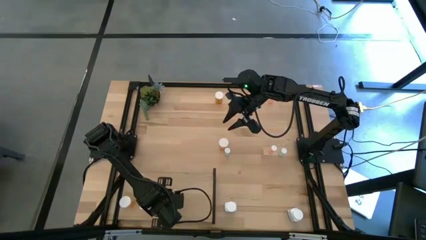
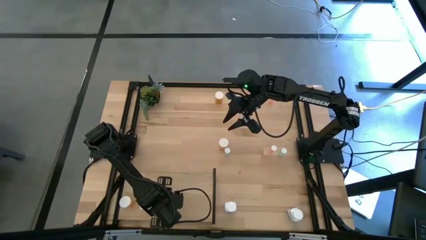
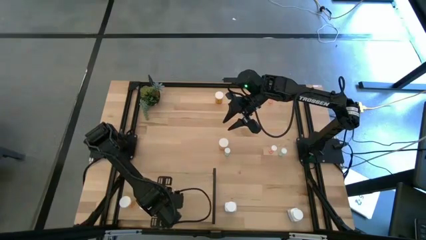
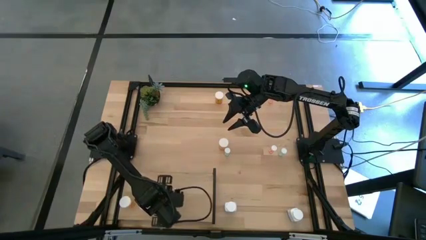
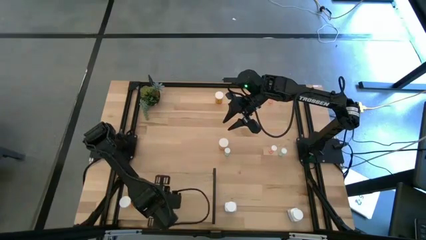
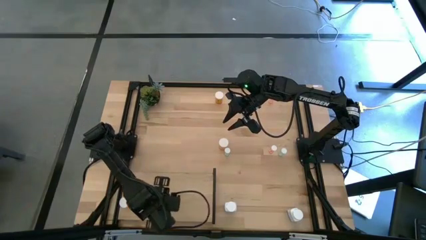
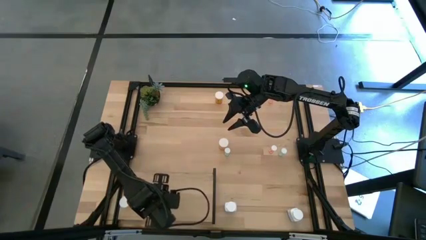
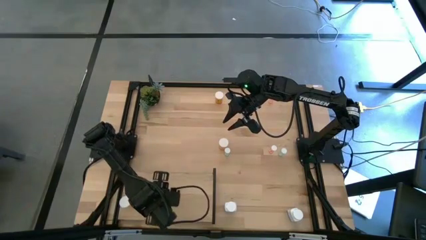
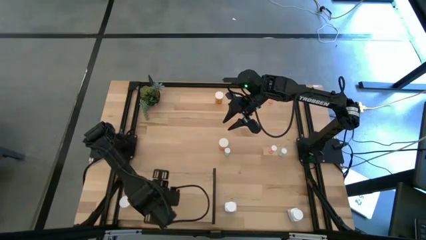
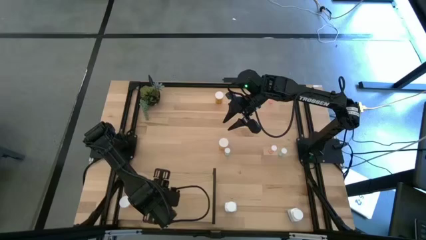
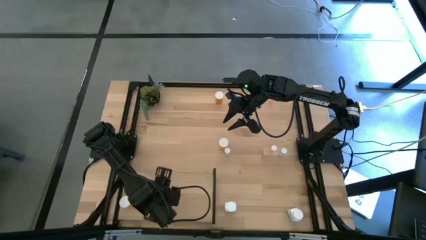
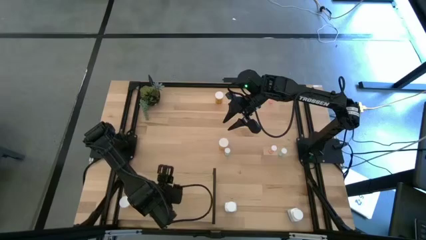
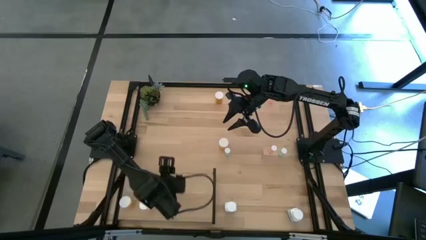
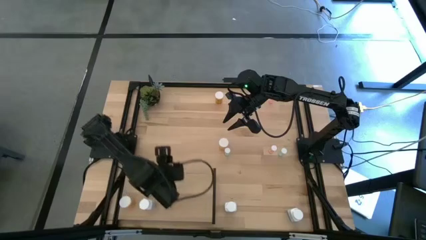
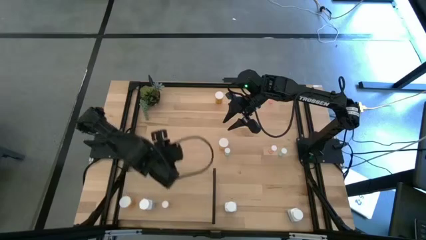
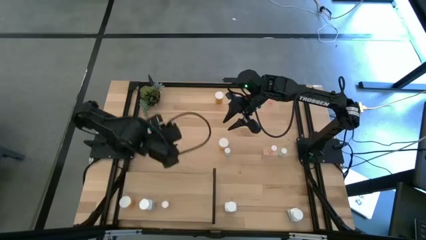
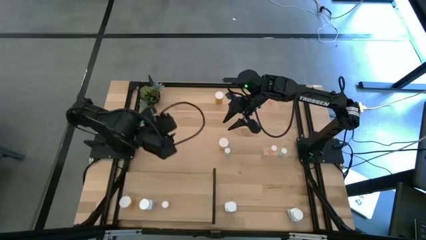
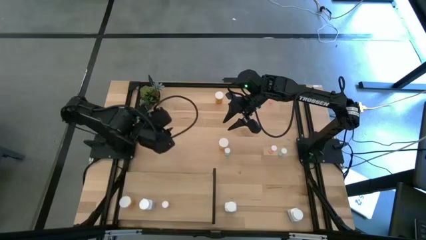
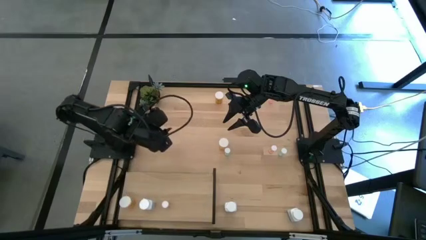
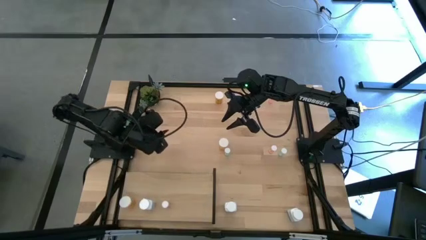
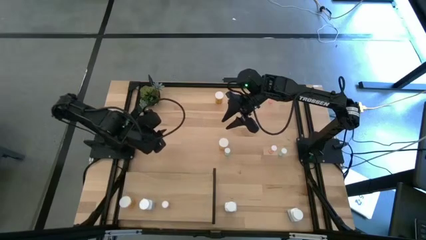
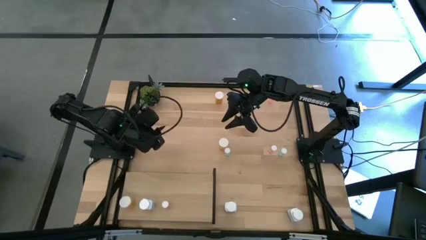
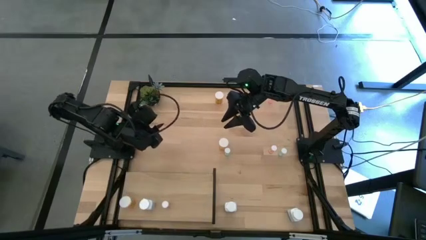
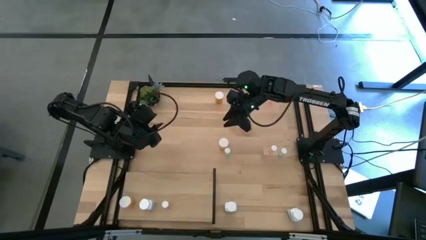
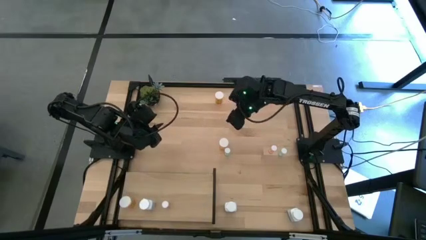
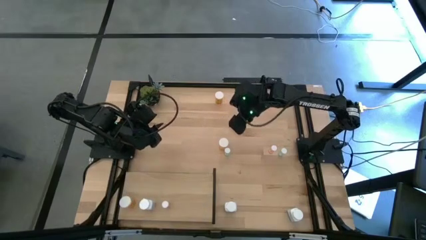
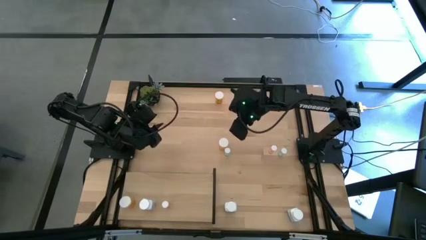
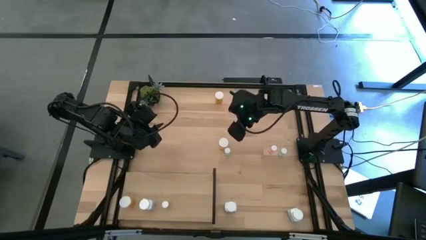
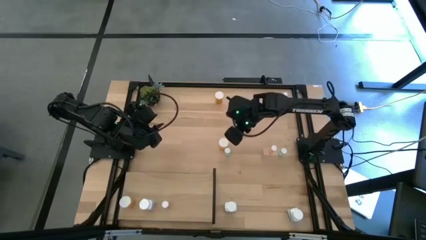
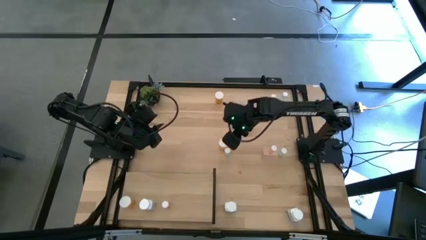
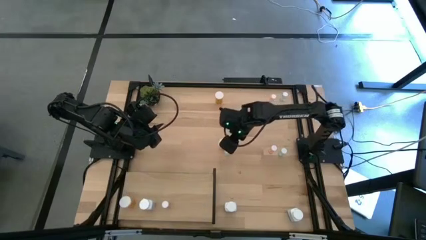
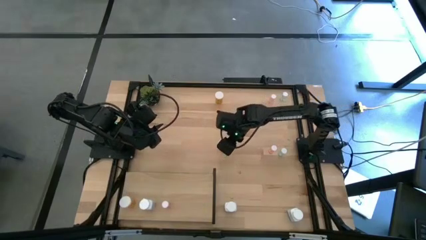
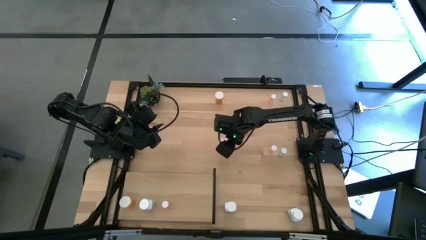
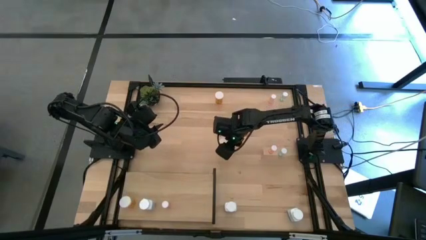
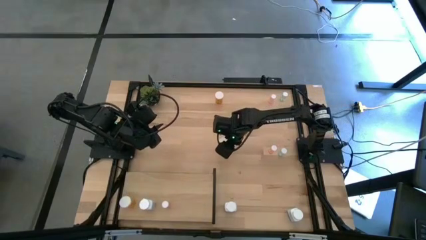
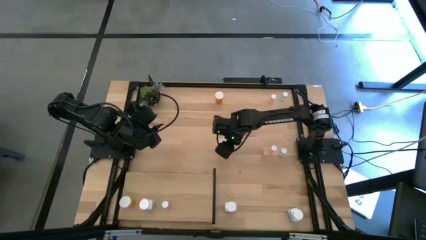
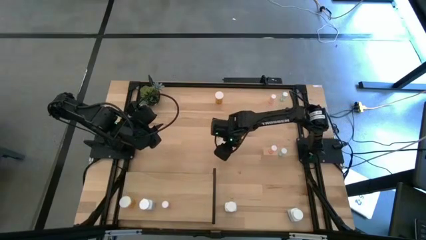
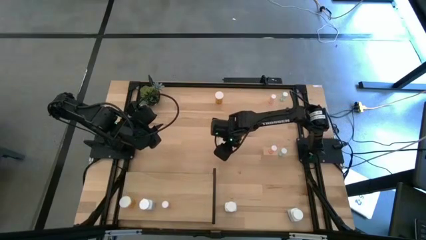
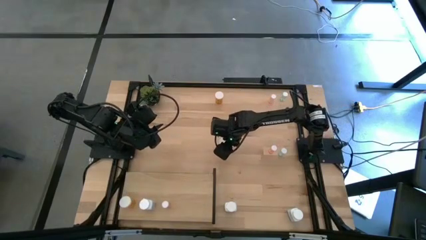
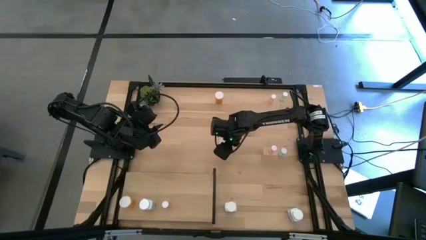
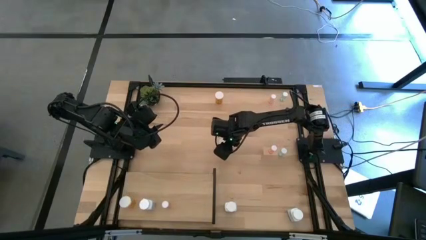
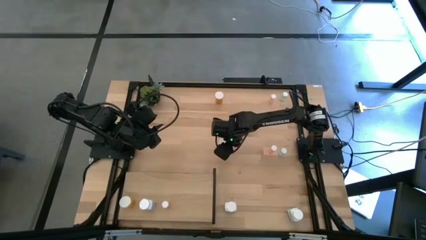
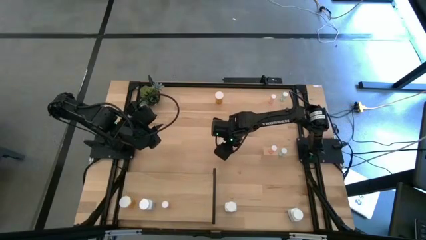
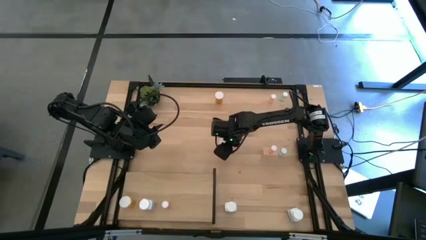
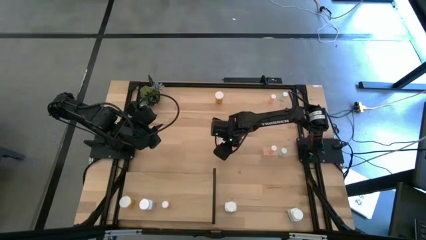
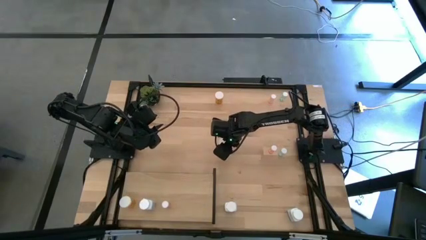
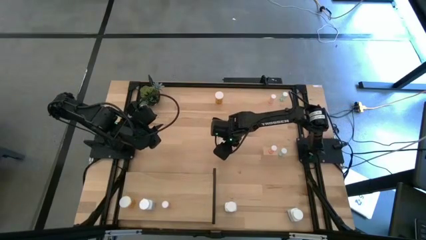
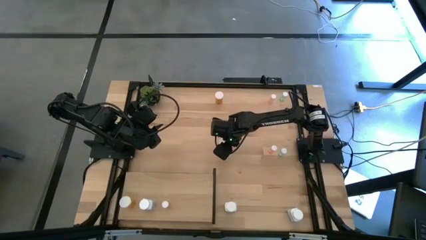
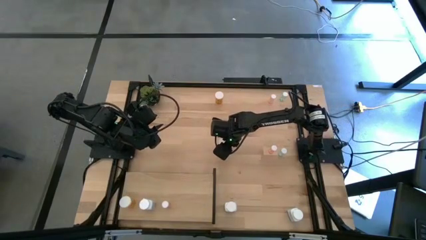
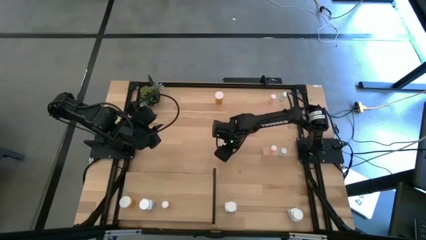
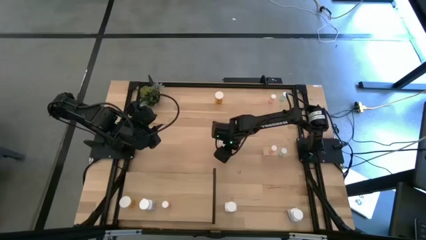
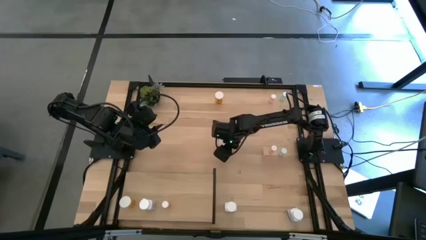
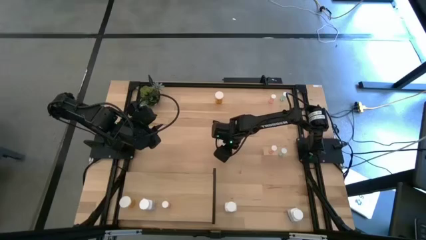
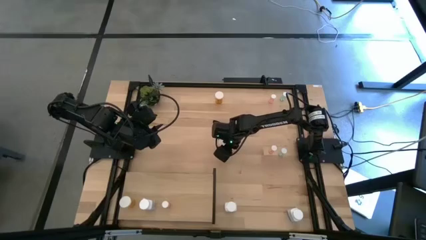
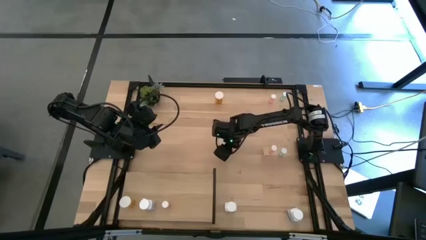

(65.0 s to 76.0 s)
Task: Pick and place medicine bottles onto shelf by color
Put the bottom left small blue pill bottle on the shelf
